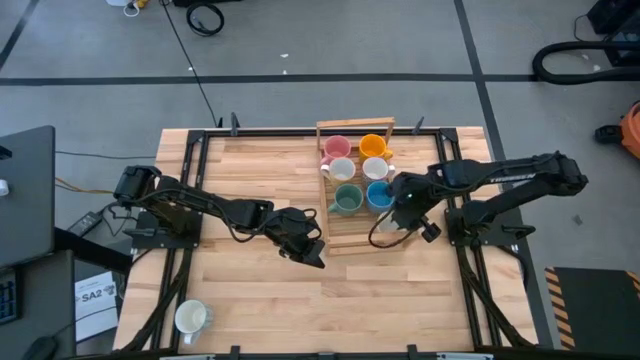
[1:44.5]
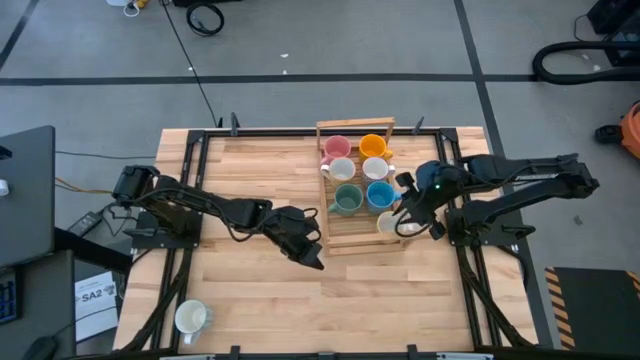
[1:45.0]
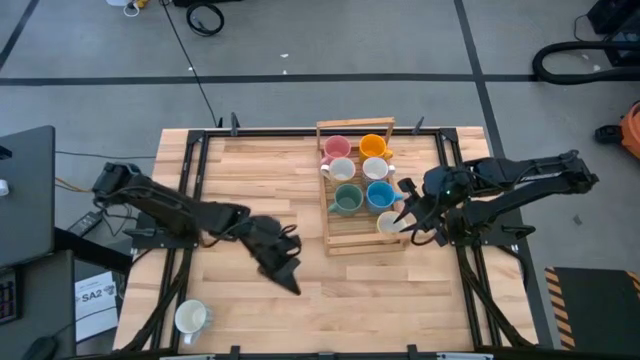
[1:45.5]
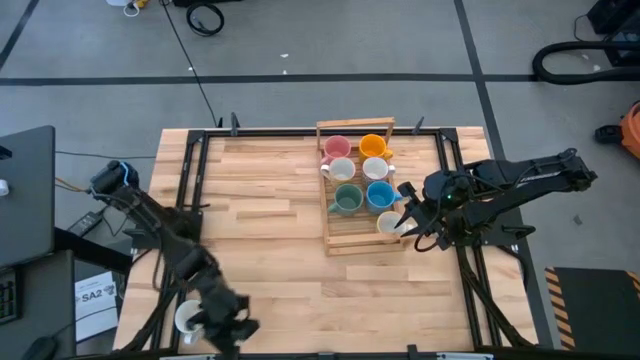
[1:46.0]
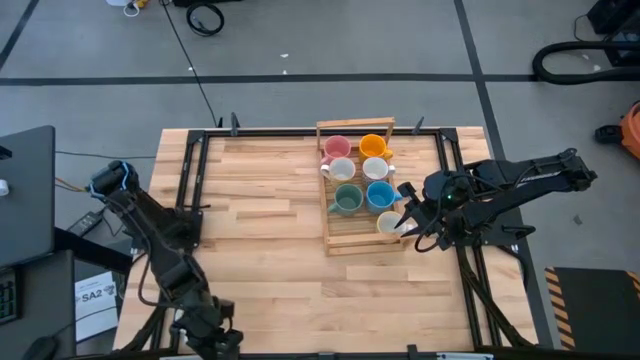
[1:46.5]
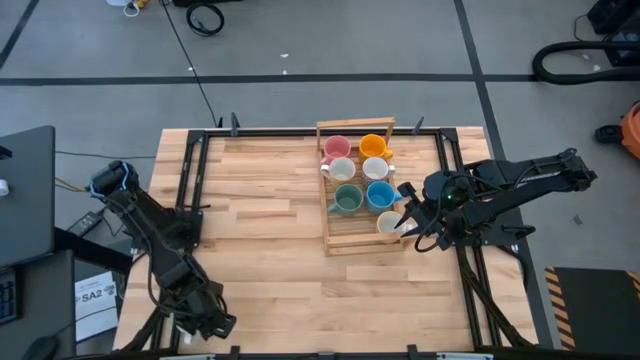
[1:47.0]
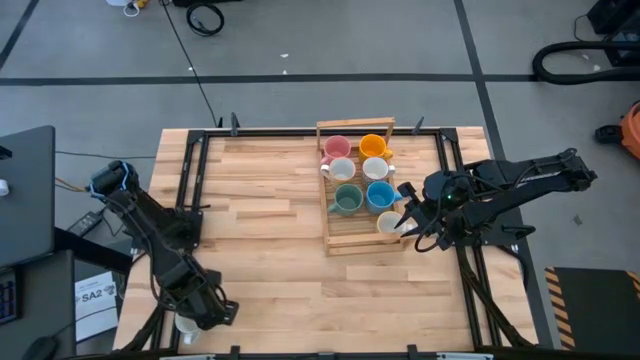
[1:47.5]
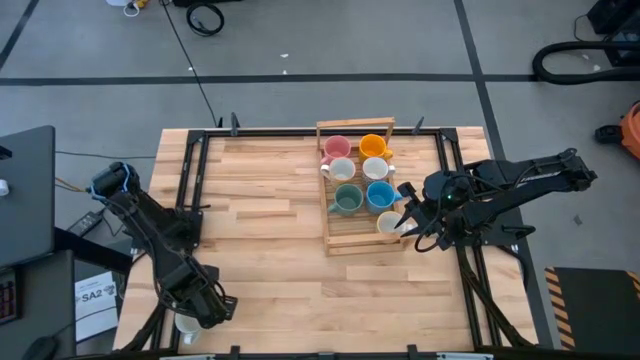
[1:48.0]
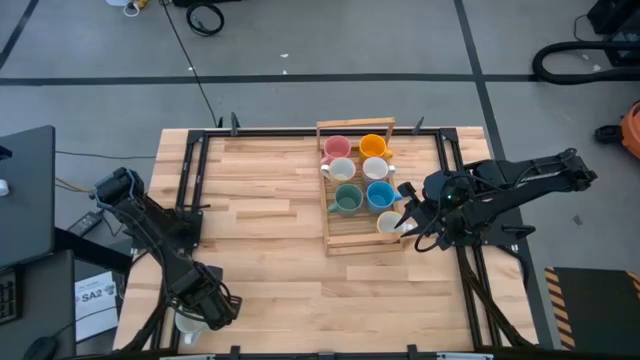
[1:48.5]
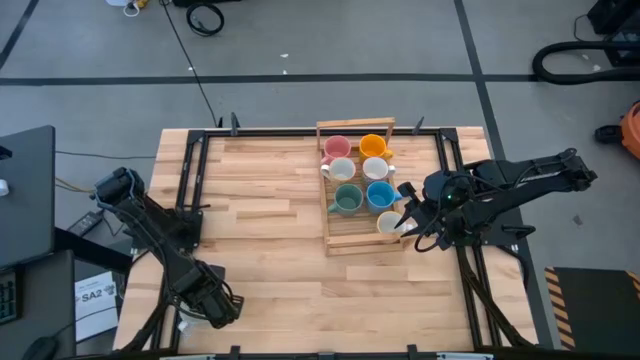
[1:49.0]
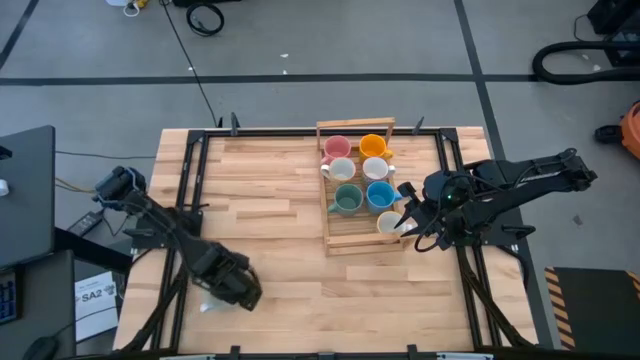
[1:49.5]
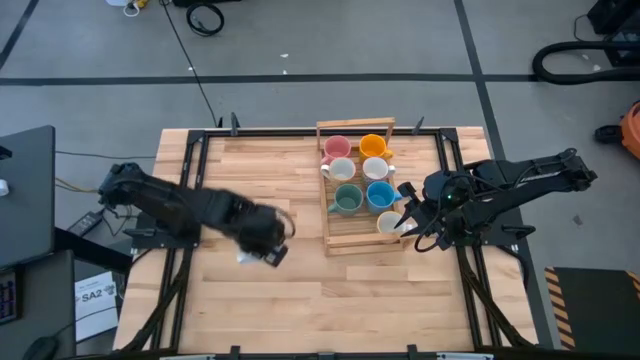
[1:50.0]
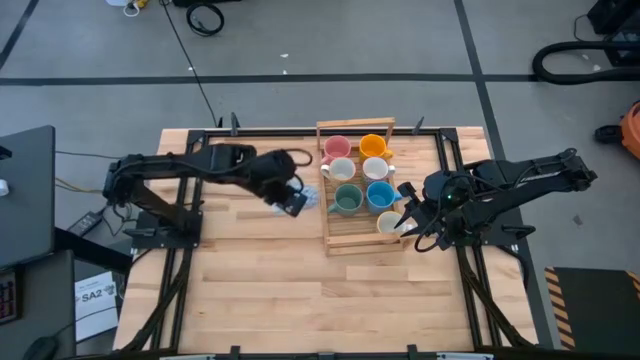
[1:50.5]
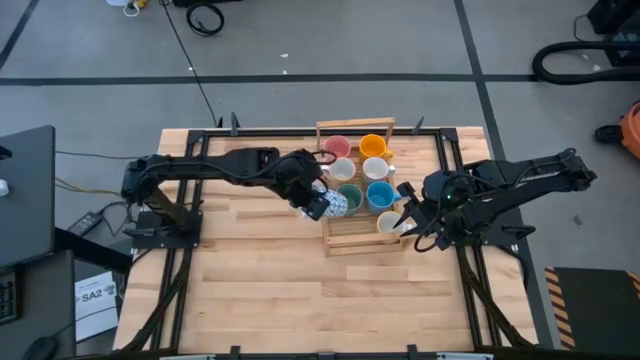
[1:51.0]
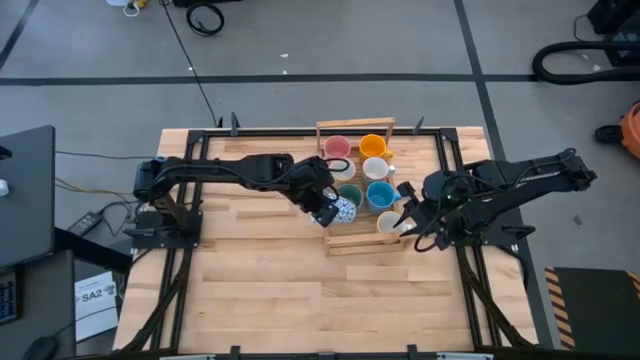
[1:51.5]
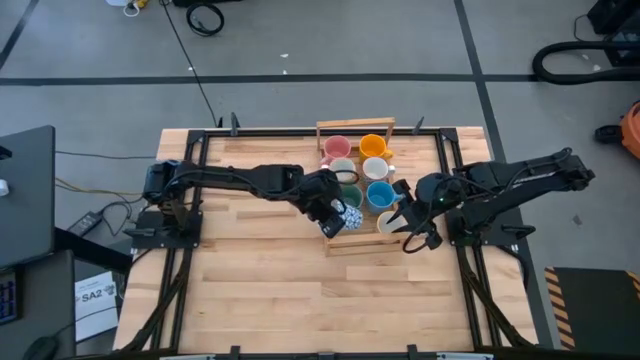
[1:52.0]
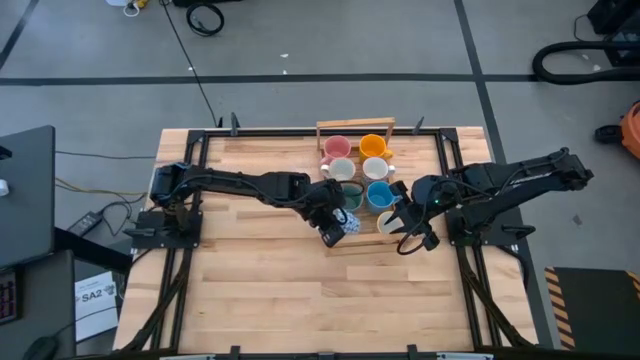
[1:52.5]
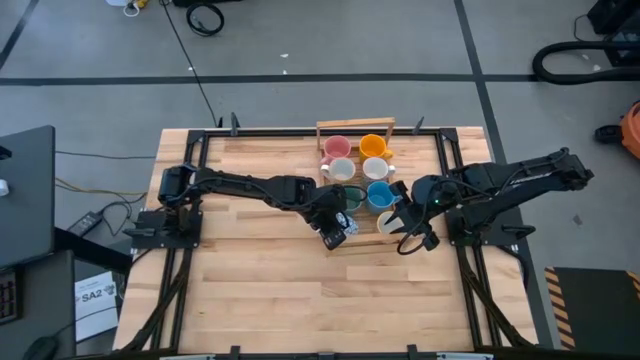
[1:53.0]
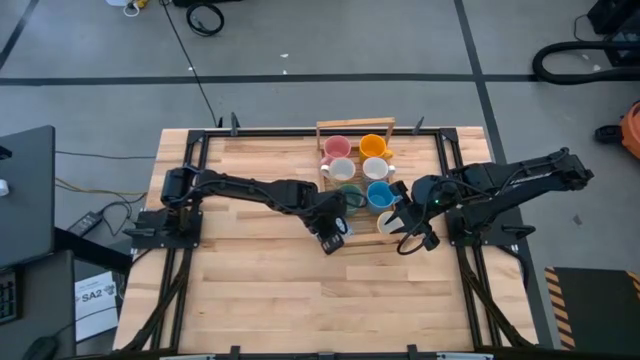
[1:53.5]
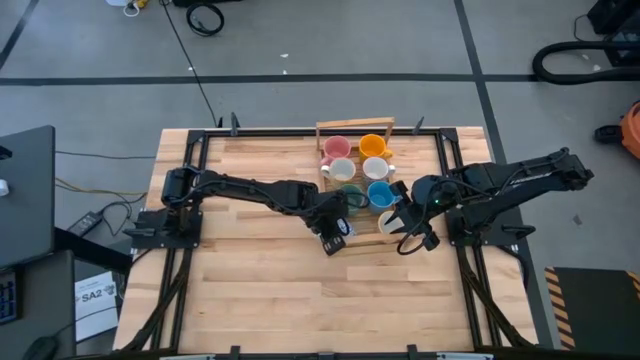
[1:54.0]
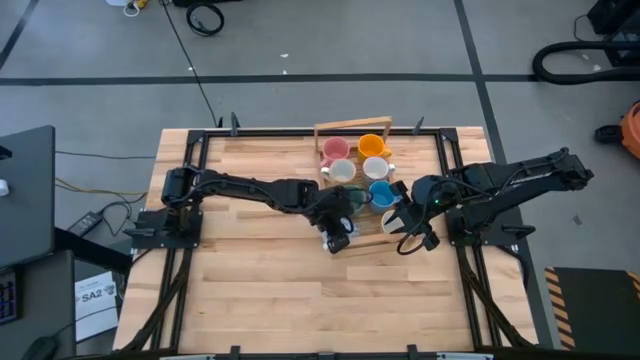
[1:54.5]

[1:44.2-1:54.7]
Task: Place coffee mugs
Put the blue patterned mug on the shelf

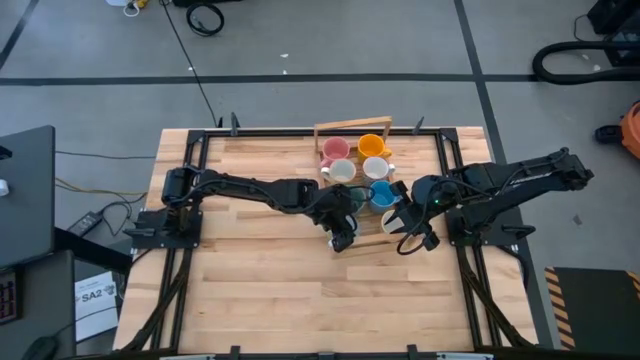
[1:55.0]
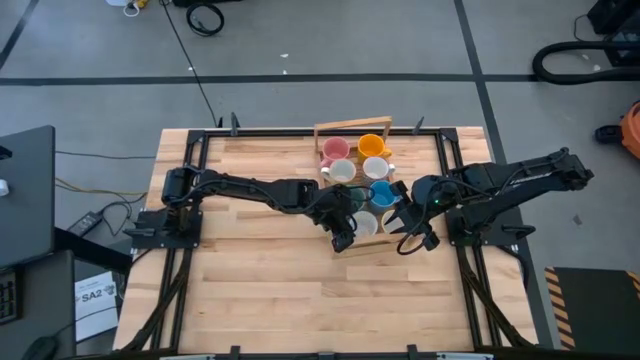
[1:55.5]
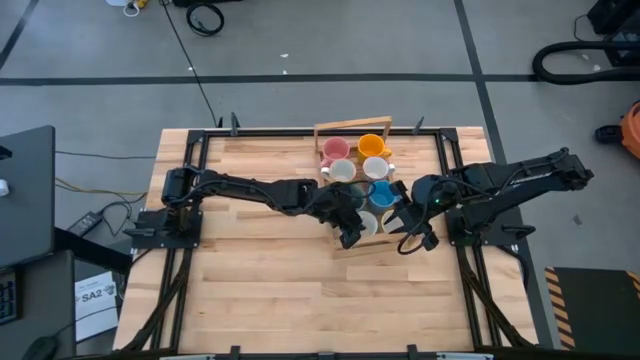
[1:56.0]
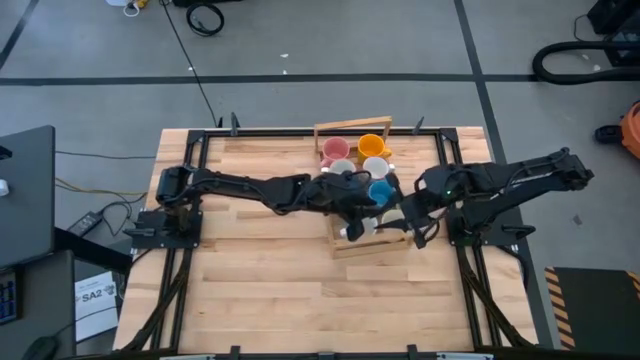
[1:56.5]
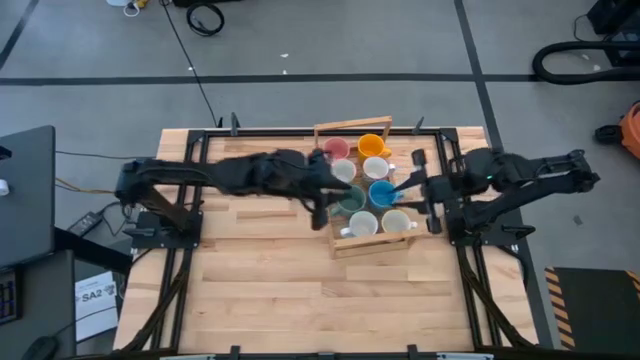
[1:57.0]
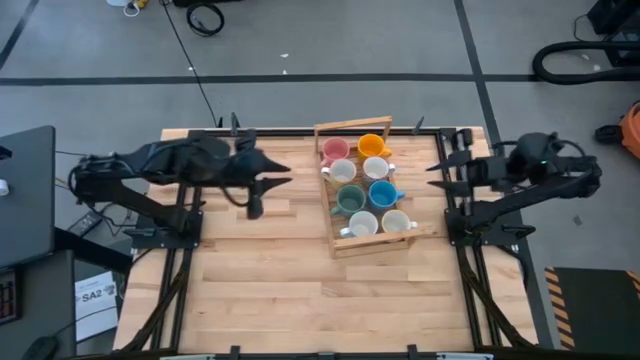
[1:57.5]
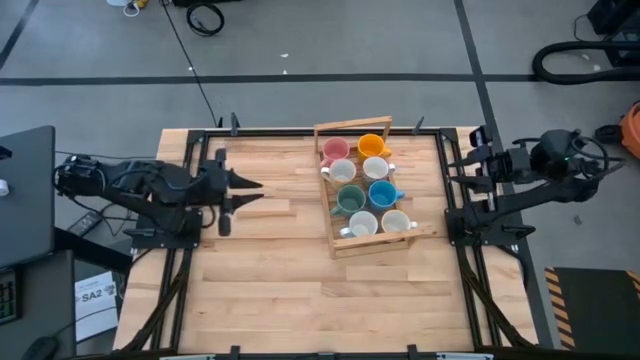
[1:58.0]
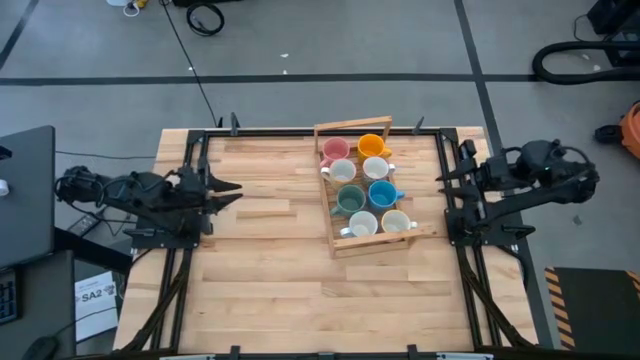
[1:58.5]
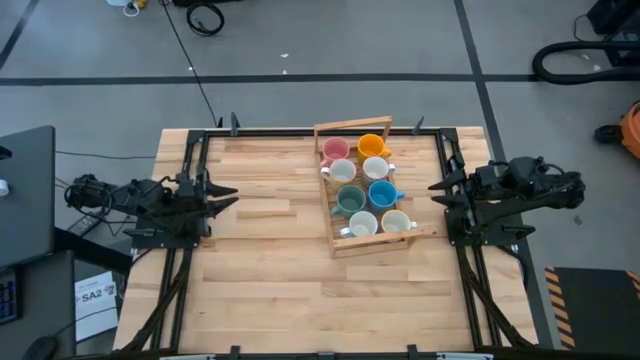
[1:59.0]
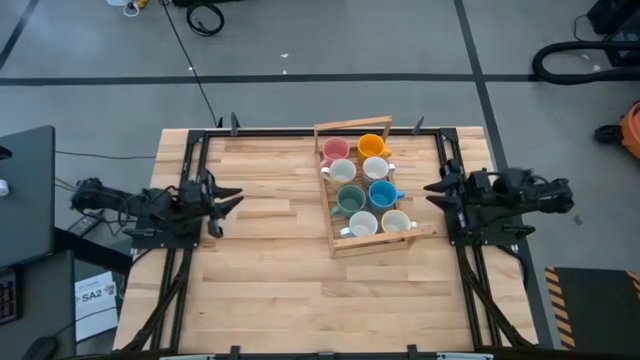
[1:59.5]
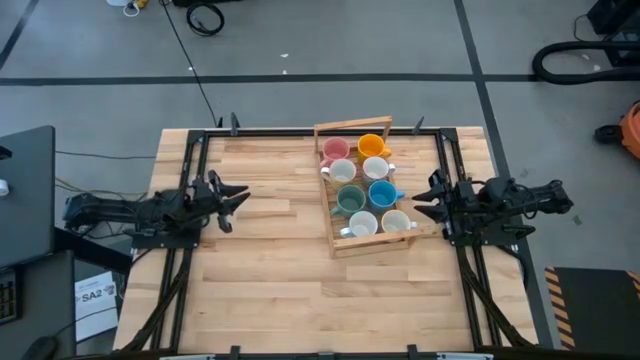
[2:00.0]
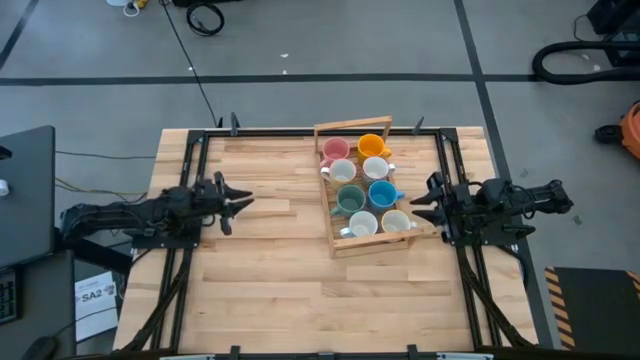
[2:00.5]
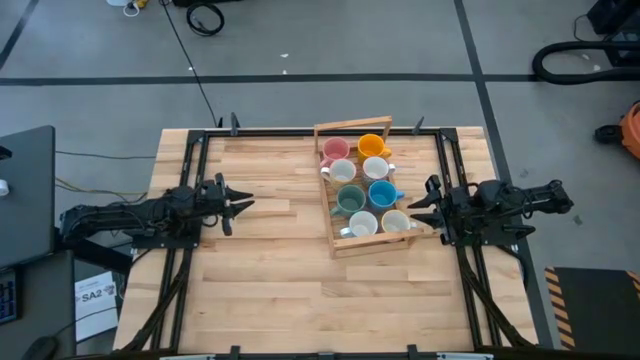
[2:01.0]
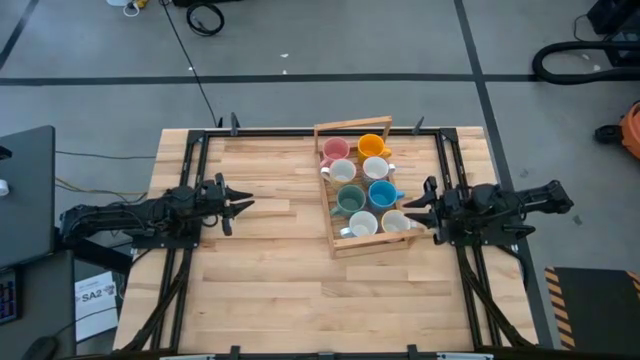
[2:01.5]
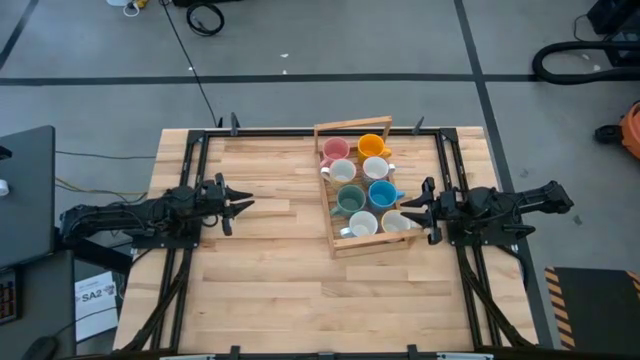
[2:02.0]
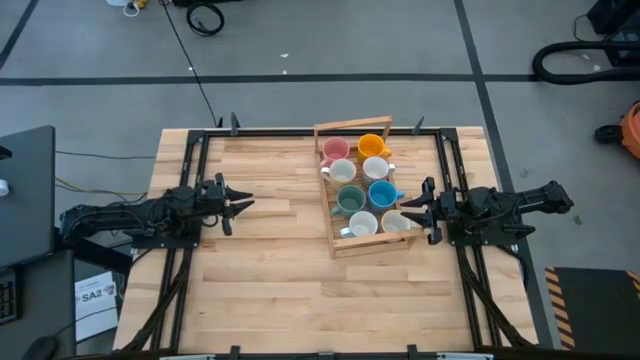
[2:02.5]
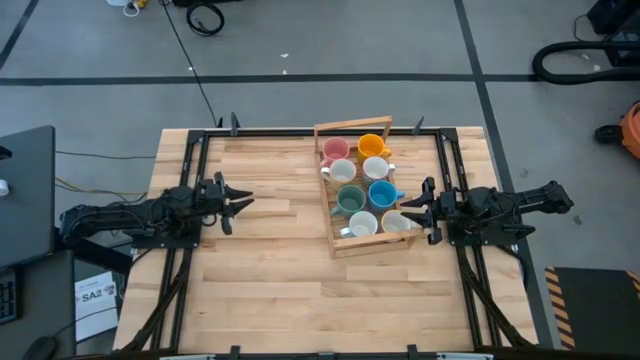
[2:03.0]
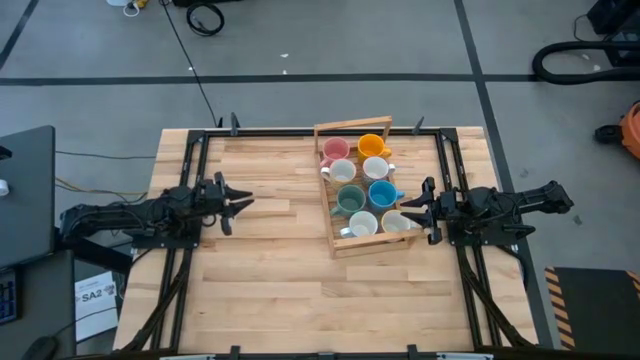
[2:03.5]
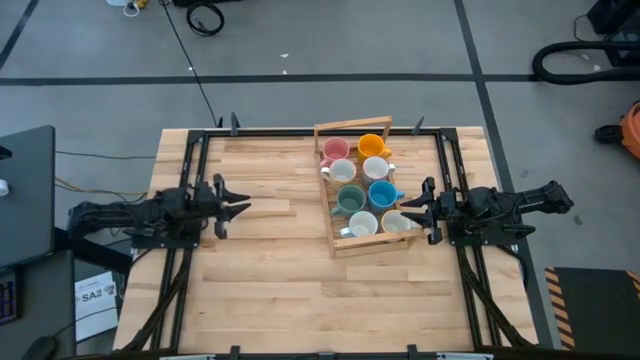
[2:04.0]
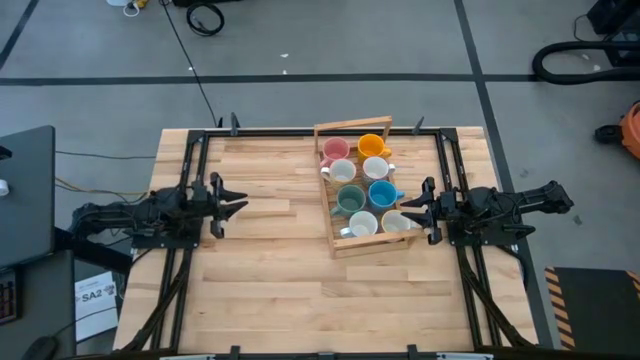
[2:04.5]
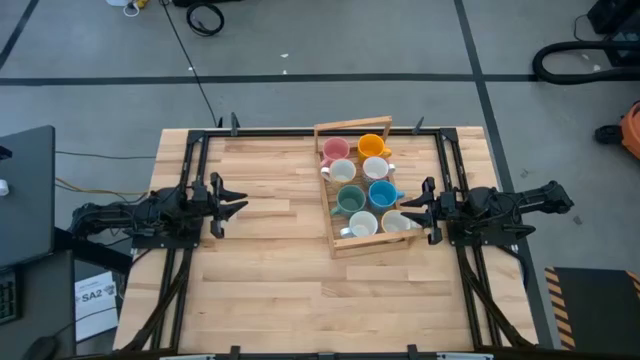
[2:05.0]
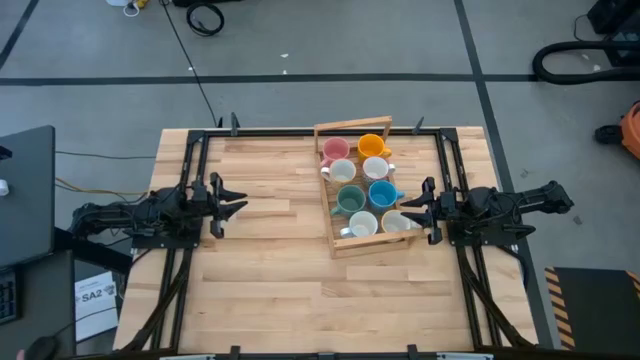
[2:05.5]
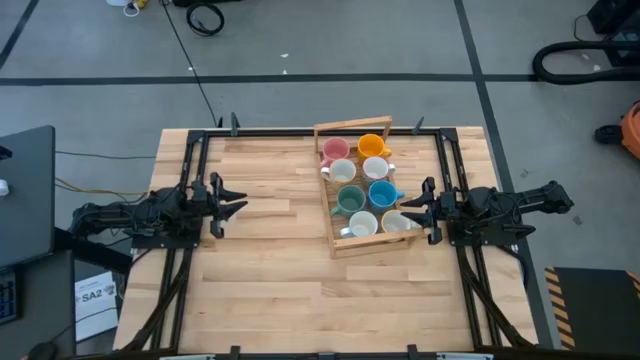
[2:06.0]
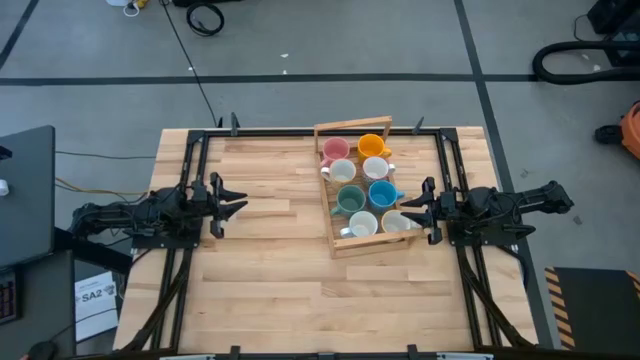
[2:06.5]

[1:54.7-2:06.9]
Return to Home Position
